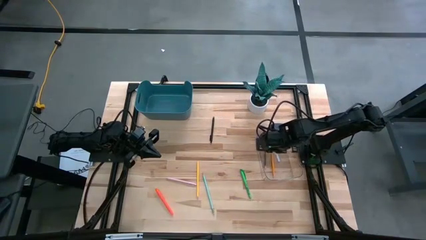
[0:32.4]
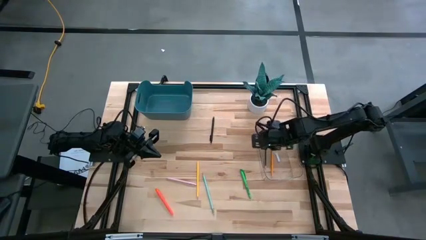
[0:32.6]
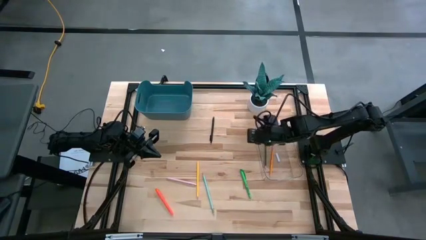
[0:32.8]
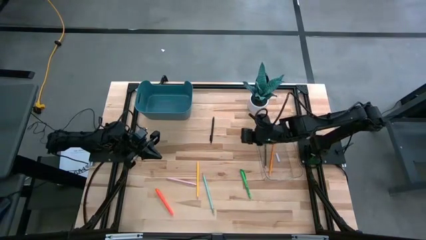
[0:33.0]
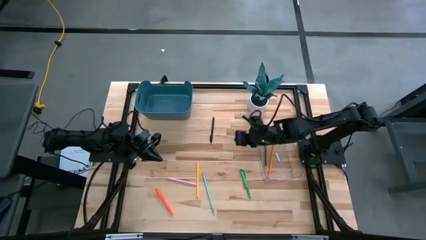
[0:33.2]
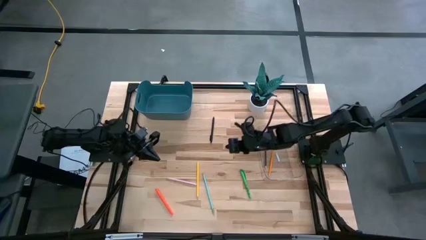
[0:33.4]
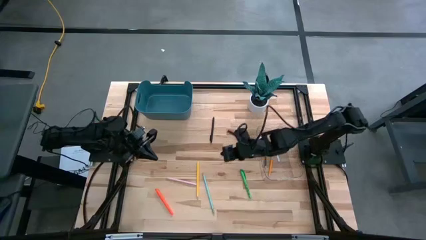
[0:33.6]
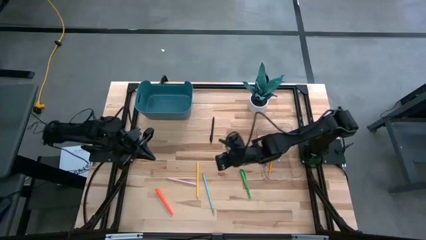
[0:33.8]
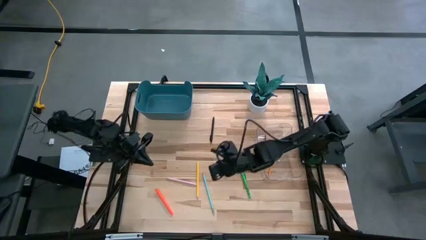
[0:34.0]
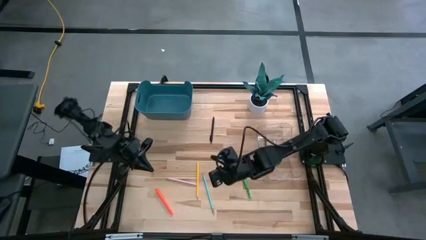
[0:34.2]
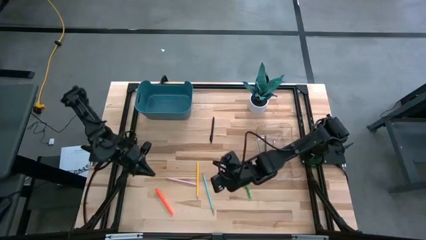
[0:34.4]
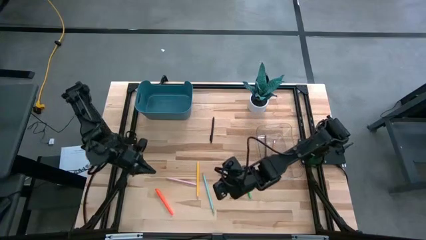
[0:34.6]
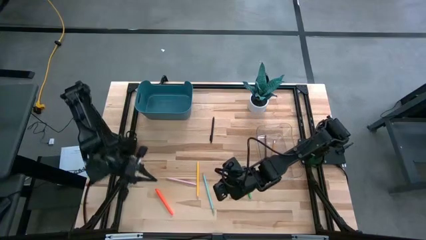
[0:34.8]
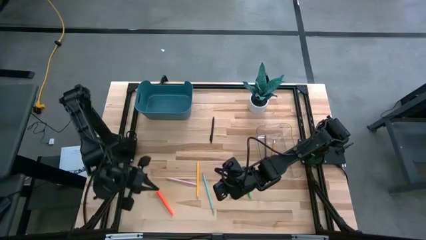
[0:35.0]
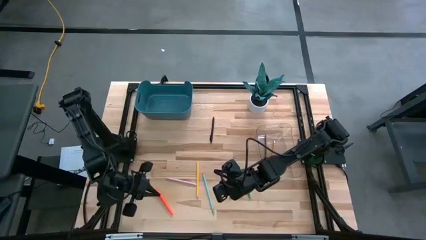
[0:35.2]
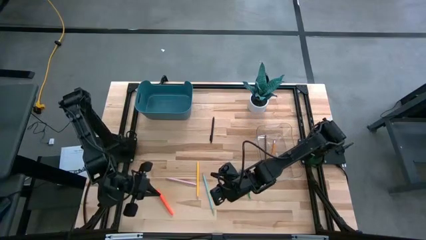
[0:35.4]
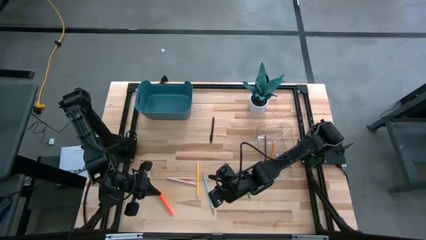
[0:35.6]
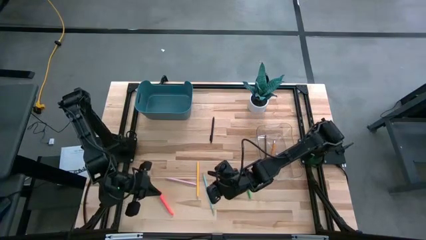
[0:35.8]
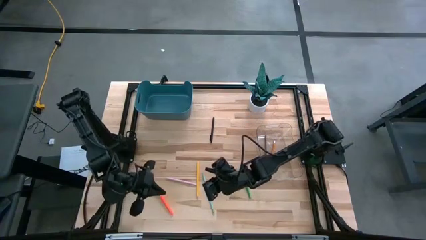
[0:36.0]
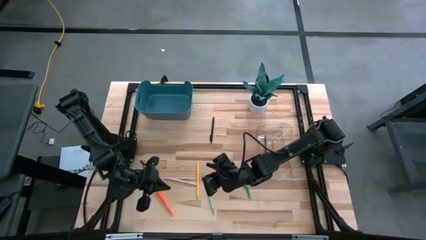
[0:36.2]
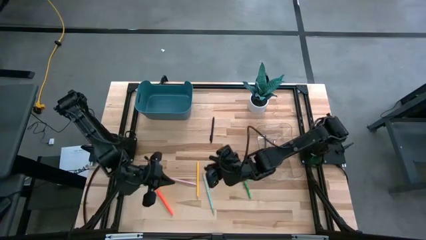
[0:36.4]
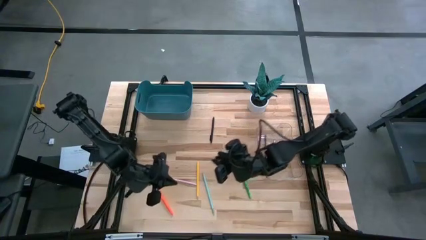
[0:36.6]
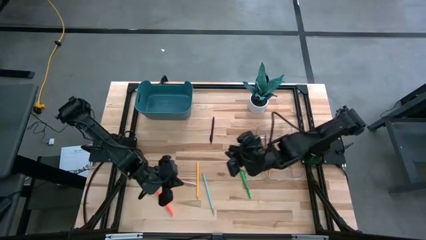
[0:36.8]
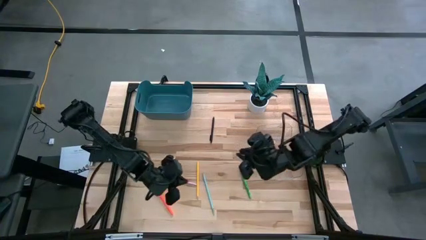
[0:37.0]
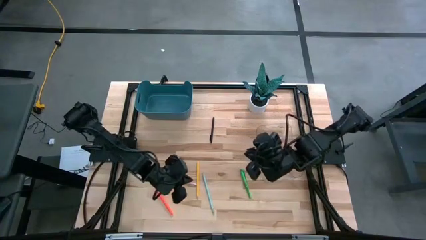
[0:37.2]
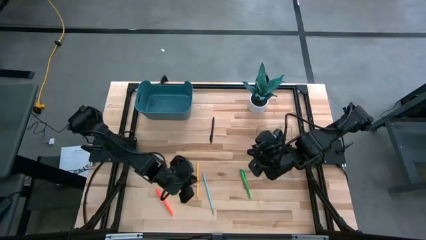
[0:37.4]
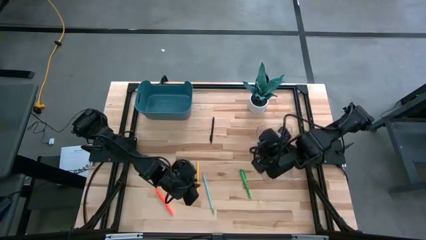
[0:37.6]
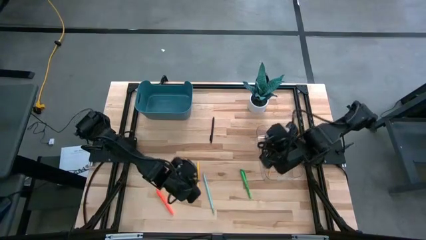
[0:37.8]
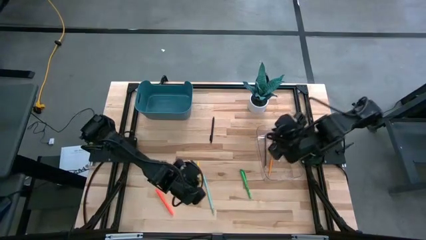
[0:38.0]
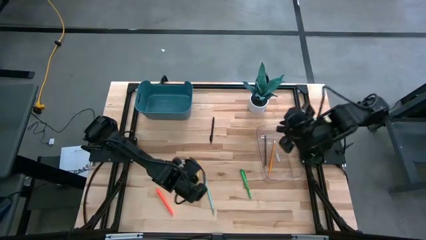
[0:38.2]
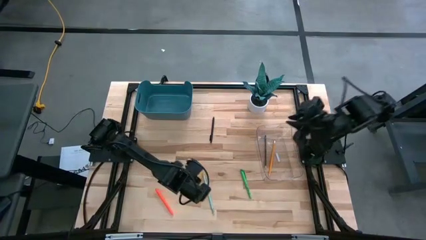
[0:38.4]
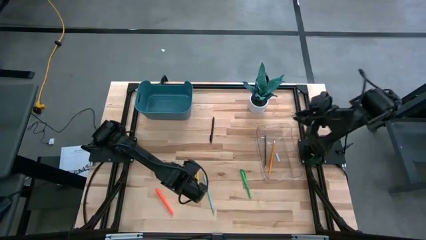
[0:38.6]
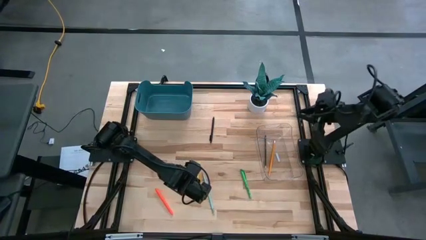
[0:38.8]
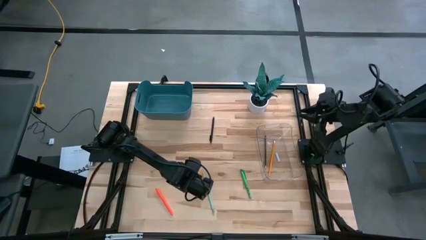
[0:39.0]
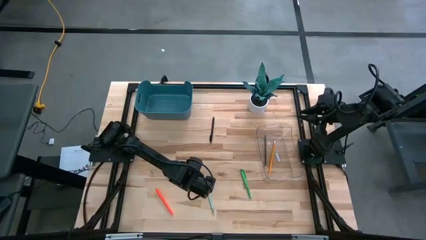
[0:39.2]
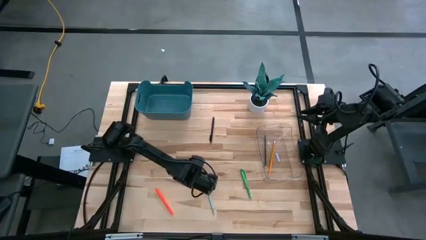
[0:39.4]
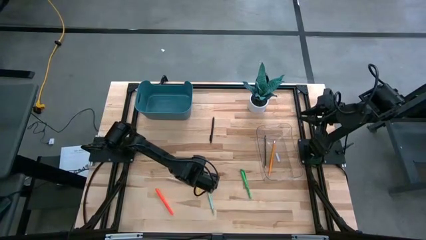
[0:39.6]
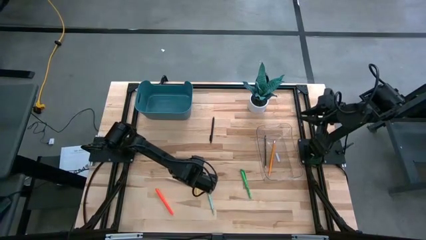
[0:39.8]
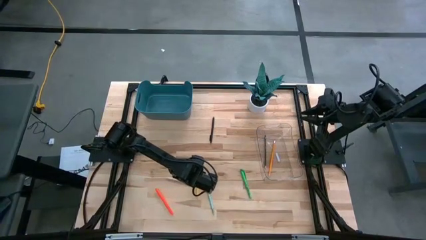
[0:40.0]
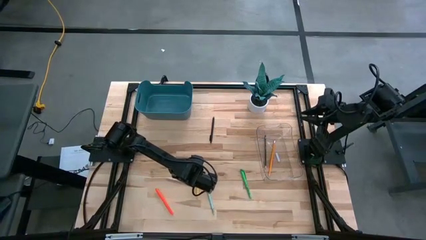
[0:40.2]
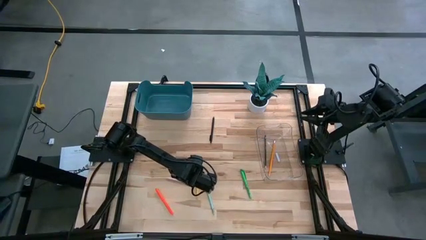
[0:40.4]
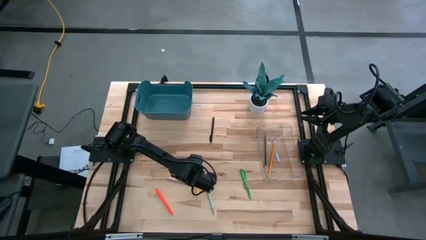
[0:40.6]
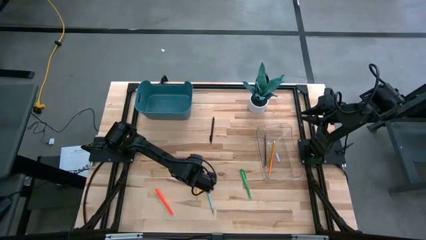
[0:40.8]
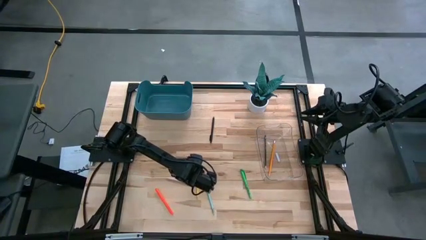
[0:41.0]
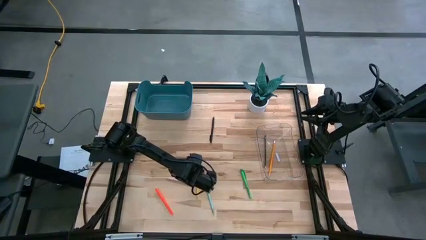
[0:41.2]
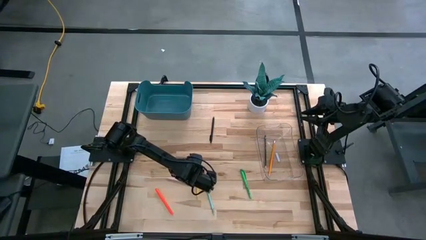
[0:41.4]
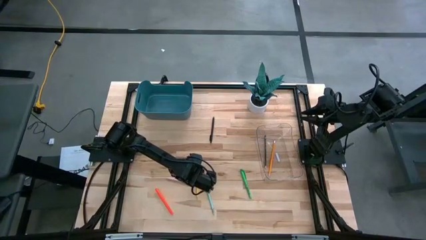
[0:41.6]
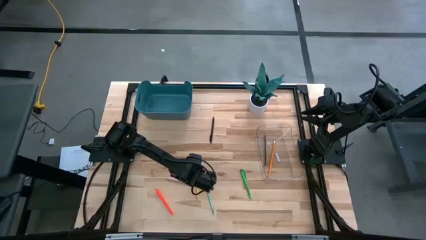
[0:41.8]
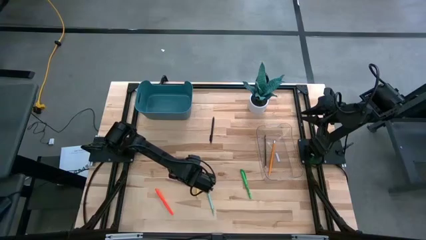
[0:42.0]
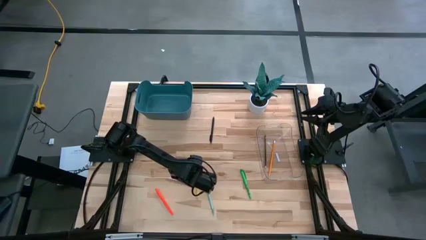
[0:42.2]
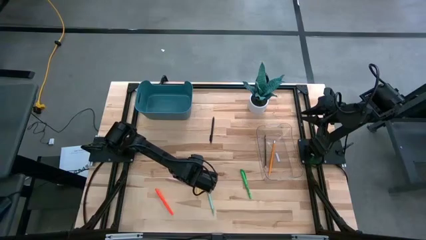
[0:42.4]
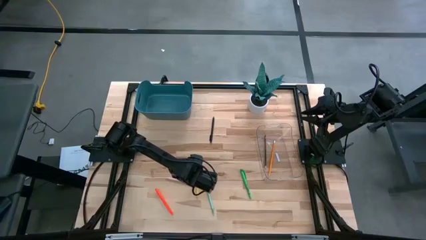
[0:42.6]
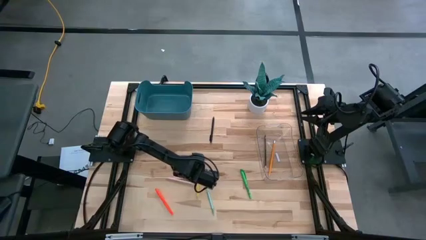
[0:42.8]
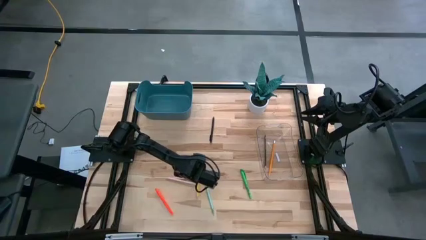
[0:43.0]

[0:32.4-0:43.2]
Task: Sort pens & pencils
Put the yellow pencil into the transparent bin

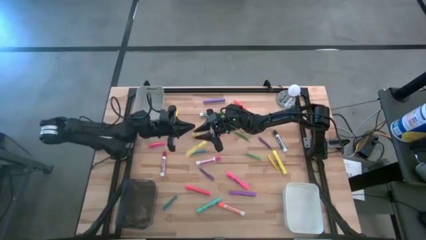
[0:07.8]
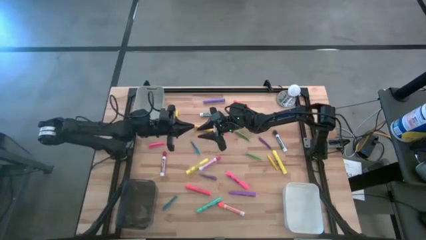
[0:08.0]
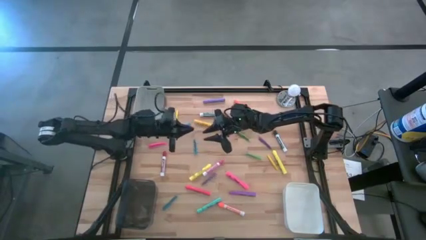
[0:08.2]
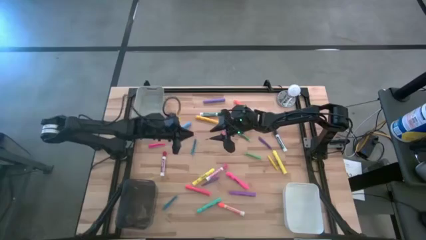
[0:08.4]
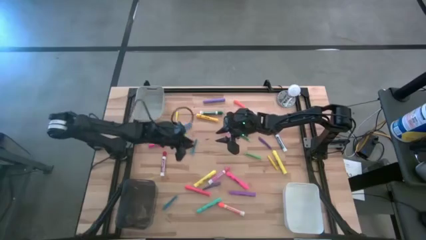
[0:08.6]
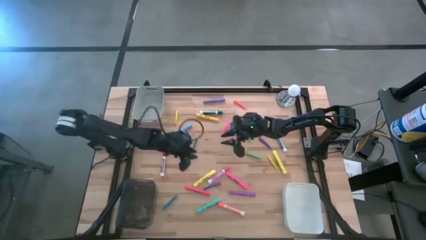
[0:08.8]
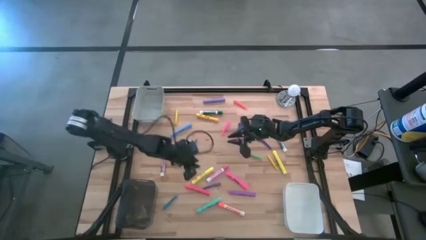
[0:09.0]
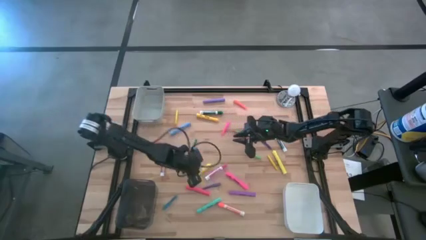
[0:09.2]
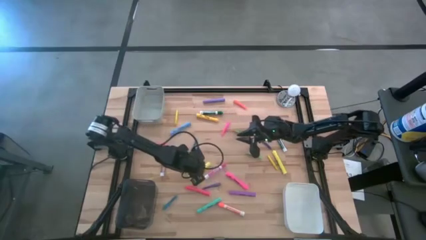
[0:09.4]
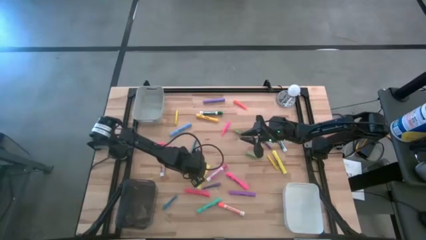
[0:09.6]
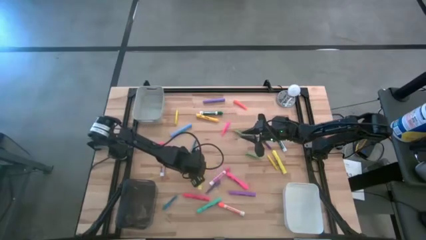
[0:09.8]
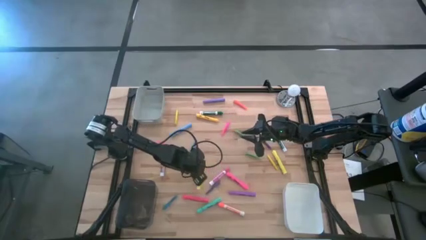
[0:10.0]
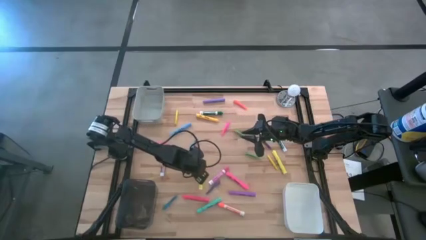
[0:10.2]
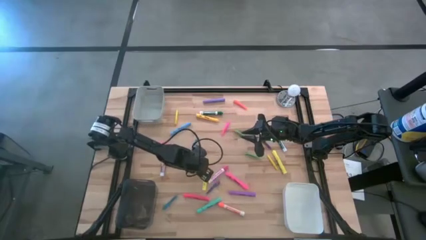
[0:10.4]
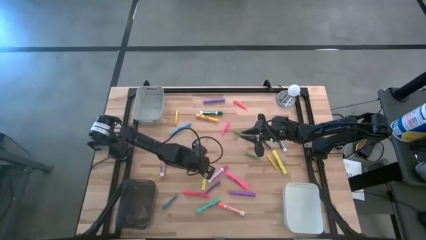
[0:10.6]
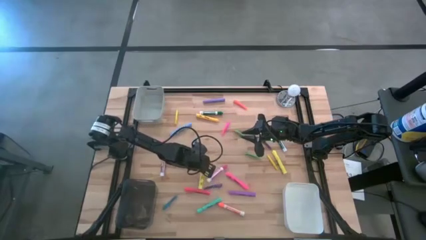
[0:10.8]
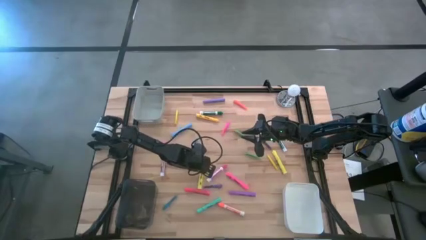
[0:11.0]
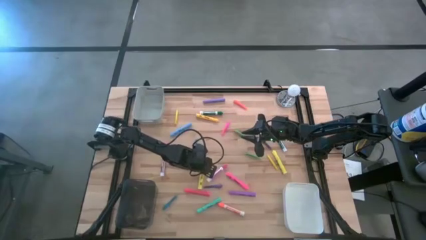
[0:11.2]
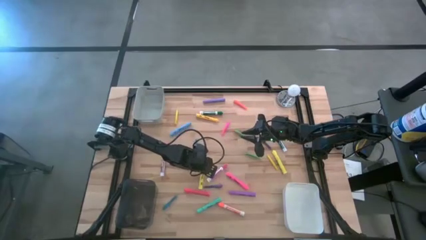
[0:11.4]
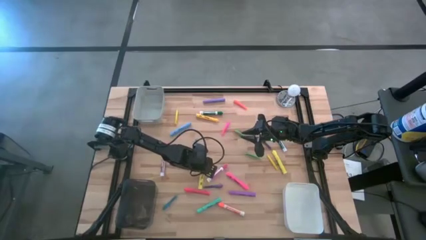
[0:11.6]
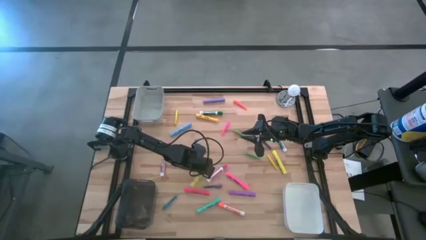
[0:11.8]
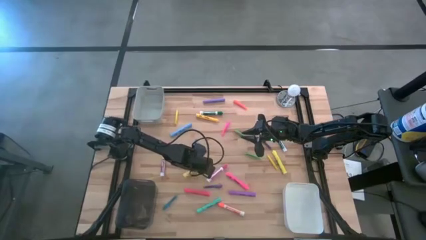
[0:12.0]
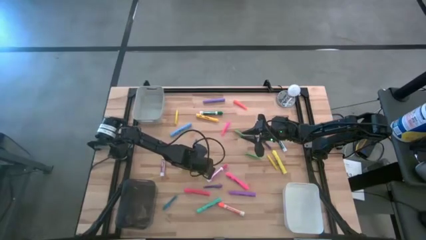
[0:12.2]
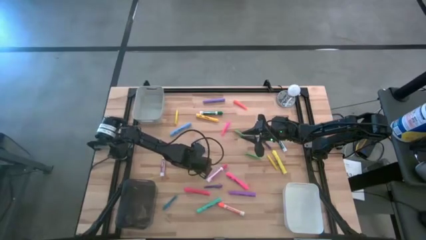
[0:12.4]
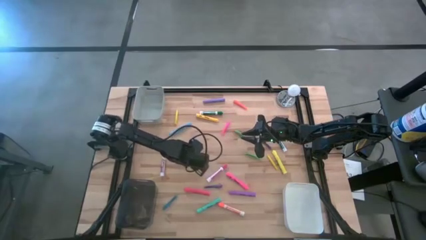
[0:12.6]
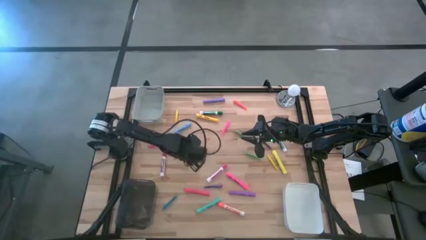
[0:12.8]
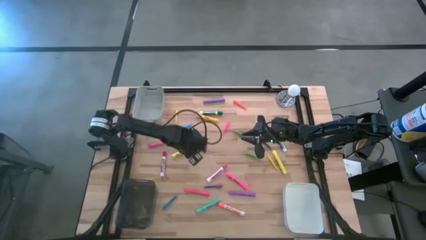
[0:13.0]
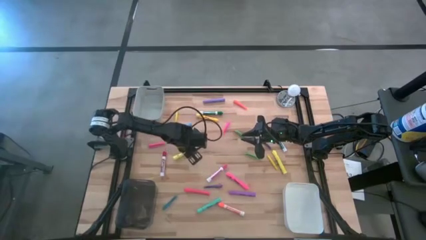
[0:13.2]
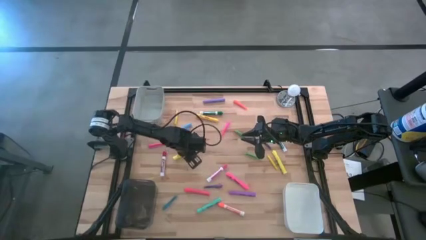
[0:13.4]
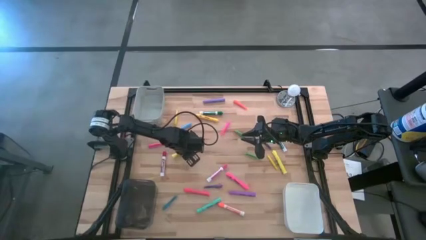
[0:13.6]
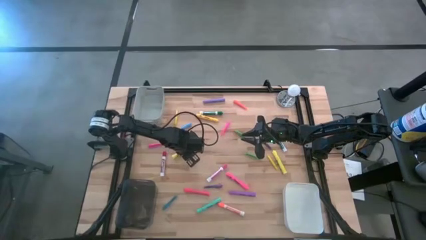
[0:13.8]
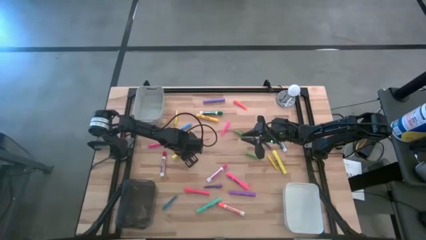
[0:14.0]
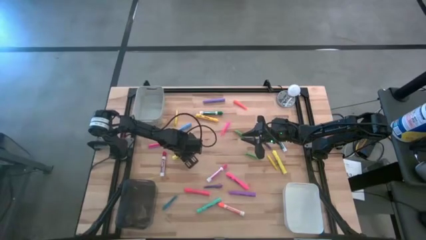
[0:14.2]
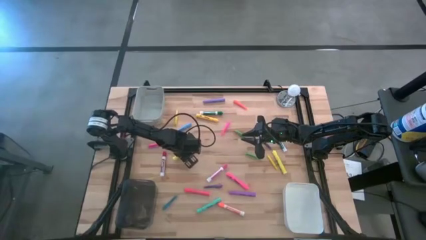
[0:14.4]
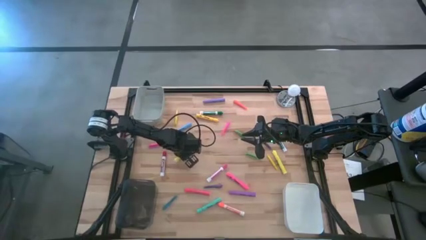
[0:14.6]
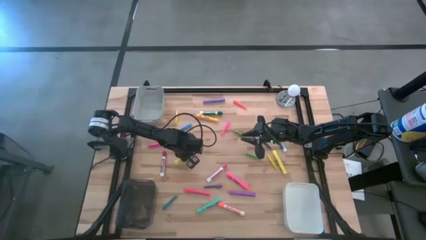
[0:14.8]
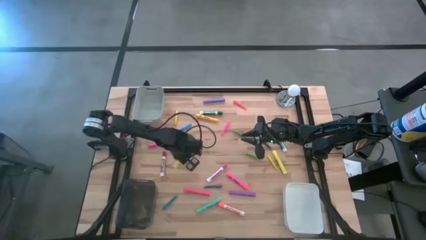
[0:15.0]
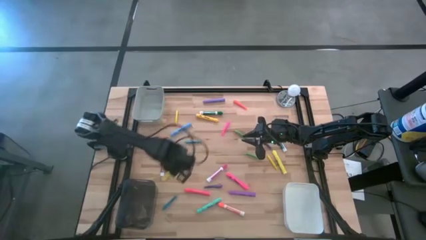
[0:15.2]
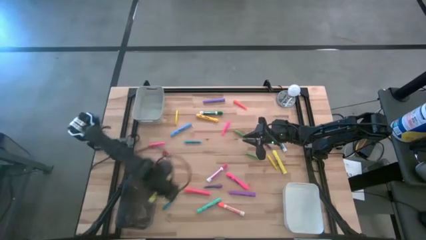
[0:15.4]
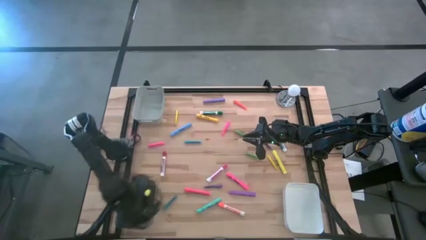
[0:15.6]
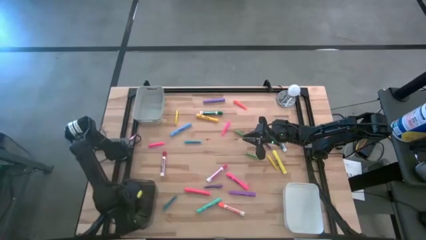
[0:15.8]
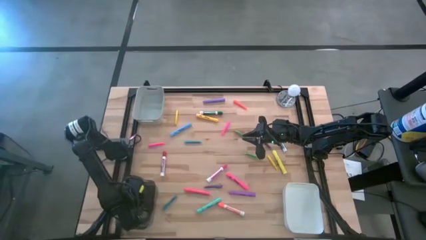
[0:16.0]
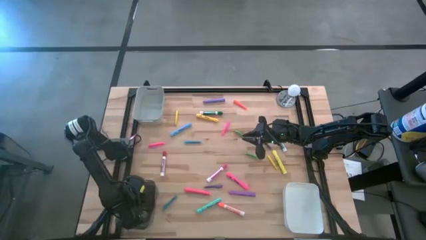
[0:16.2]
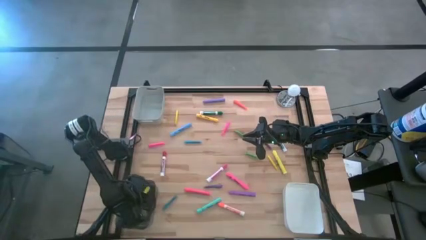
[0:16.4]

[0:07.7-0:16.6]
Task: Pick & Place Markers
Put the left yellow highlighter pen into the black bin
